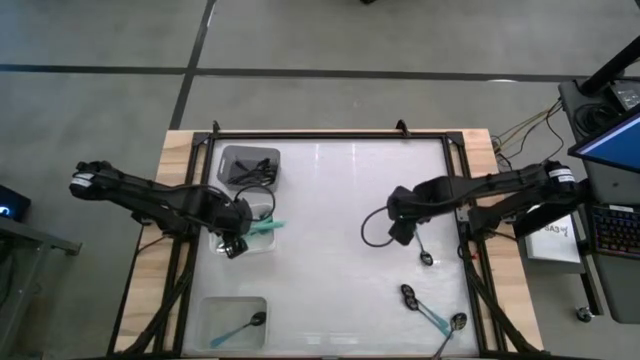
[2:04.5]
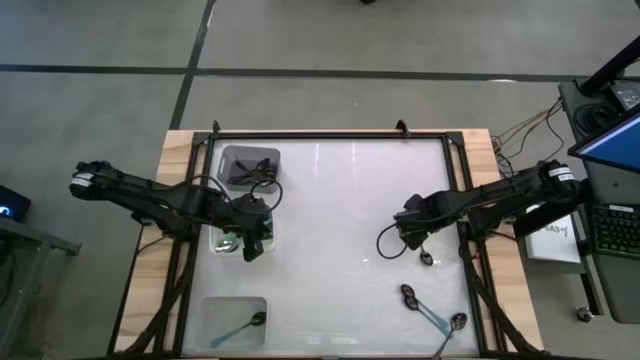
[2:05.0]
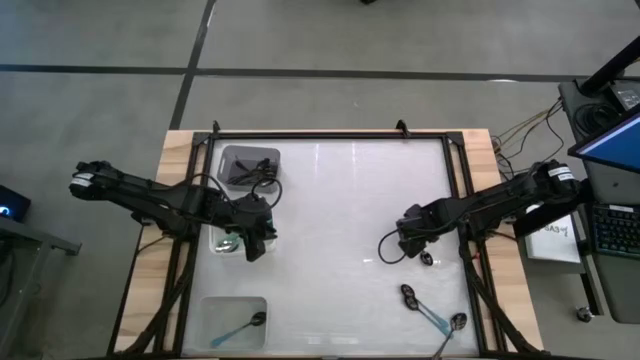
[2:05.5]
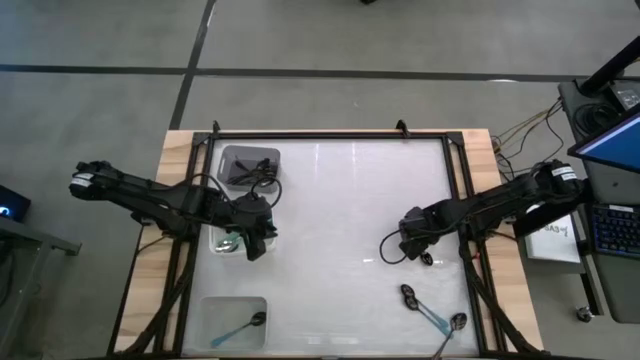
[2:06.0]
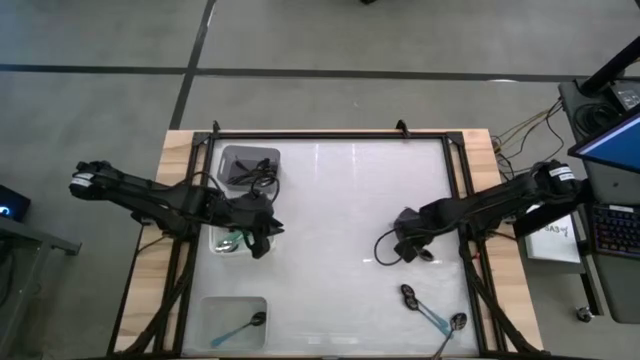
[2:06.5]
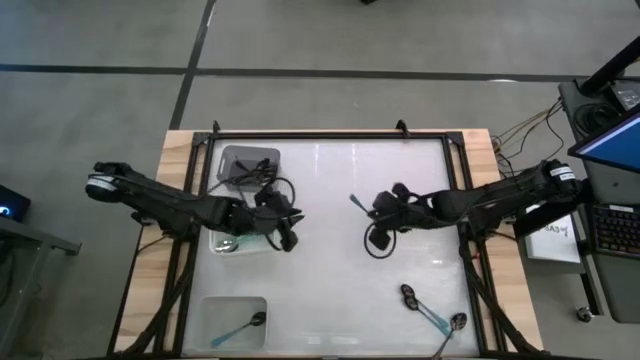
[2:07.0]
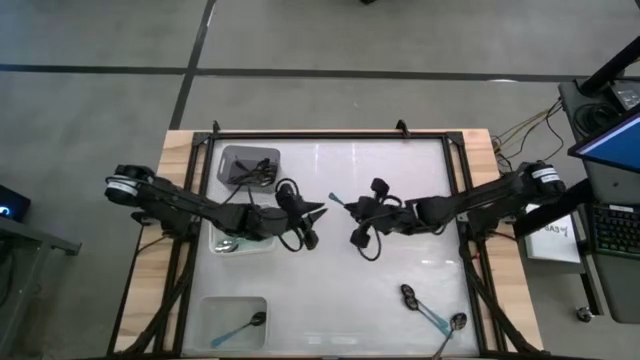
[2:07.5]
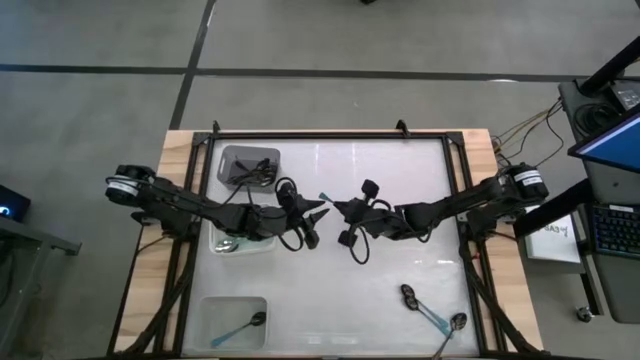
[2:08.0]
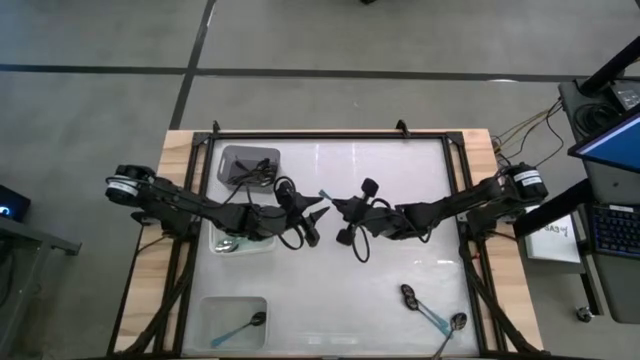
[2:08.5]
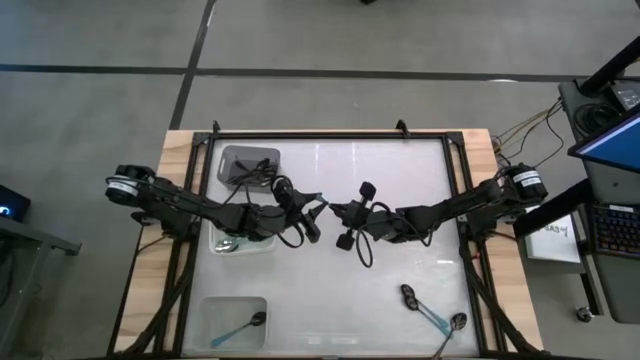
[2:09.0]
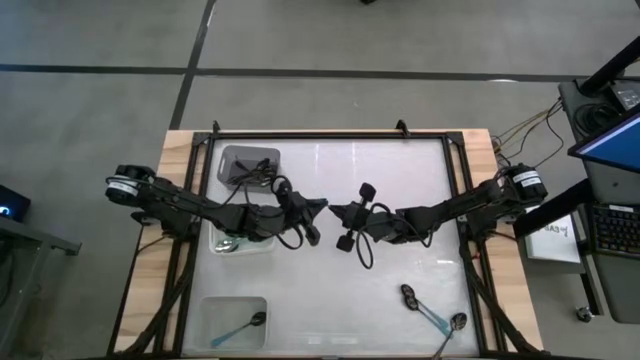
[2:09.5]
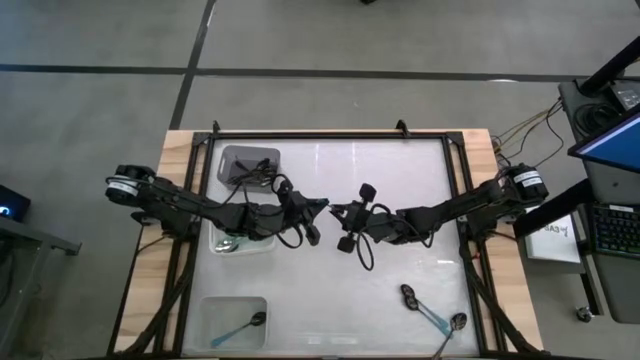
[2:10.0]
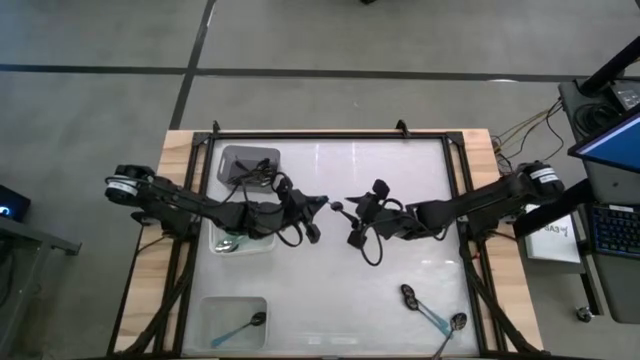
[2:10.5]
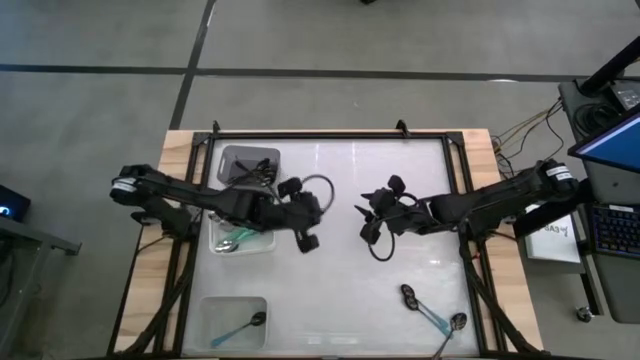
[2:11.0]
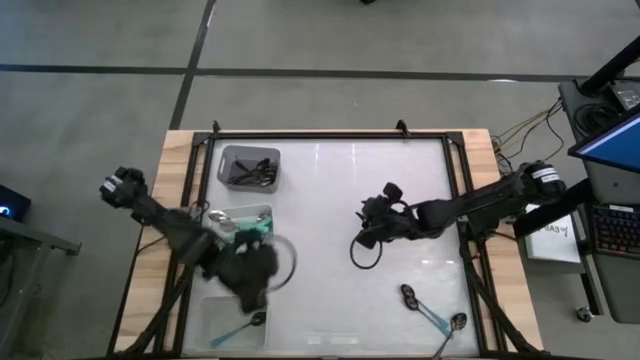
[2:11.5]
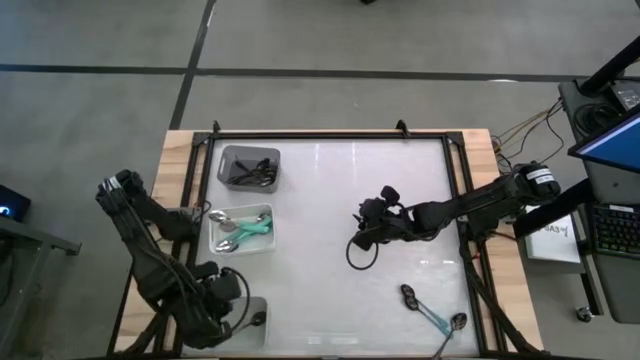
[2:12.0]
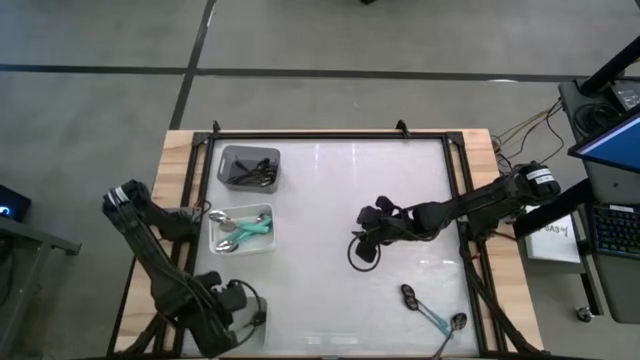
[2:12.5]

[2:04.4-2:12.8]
Task: Sort silverware by color (type)
Put the blue spoon into the gray bin

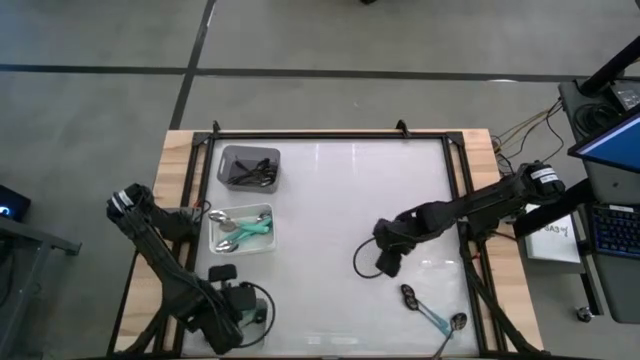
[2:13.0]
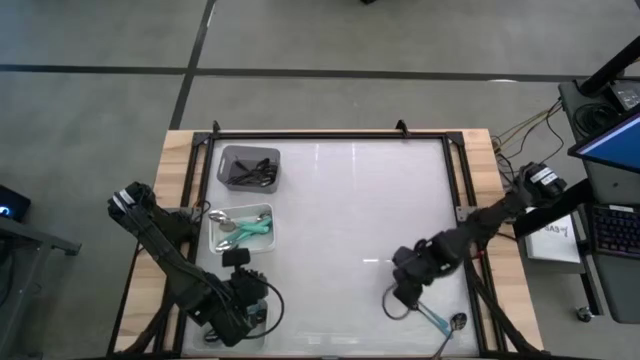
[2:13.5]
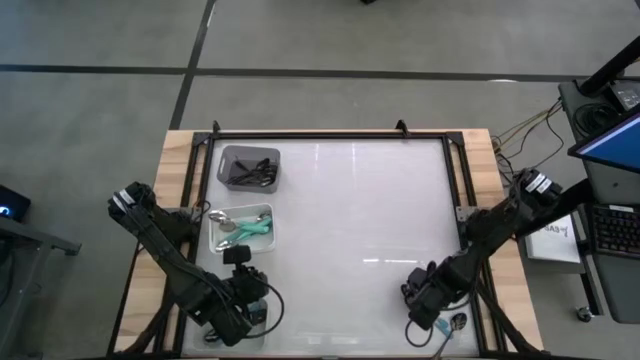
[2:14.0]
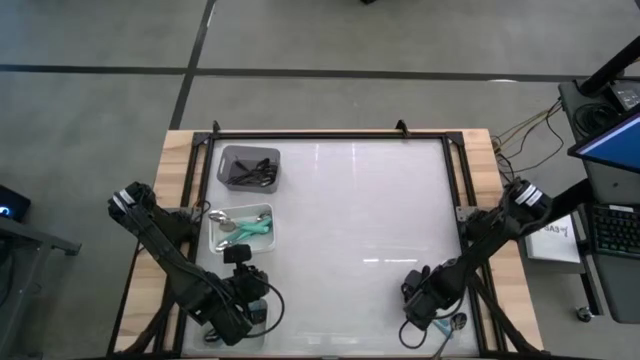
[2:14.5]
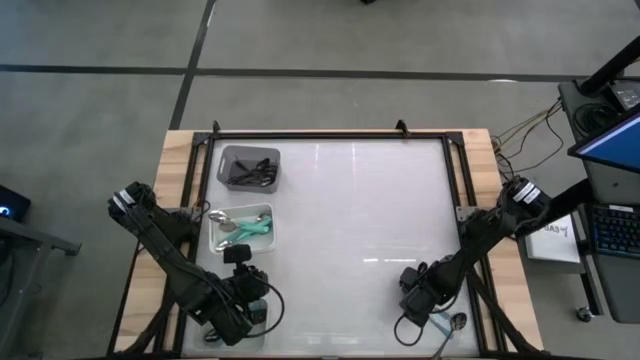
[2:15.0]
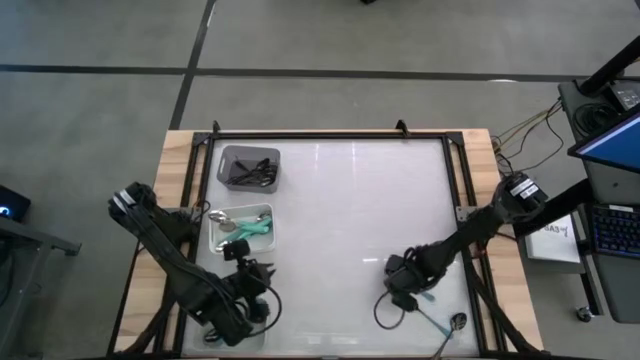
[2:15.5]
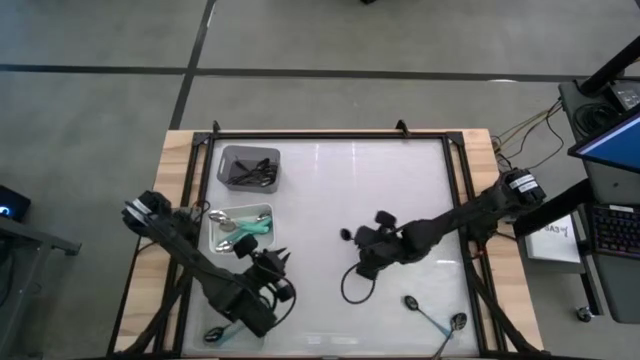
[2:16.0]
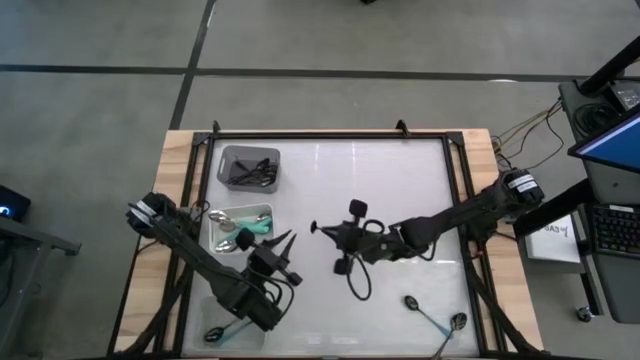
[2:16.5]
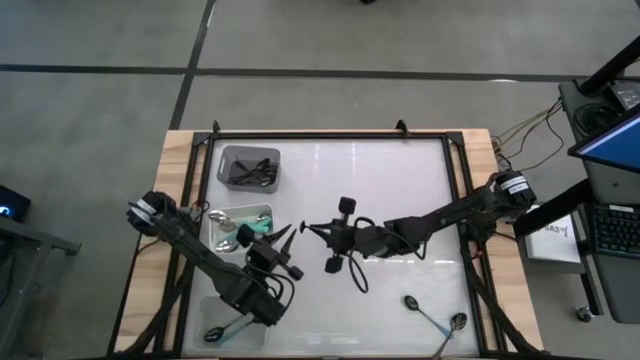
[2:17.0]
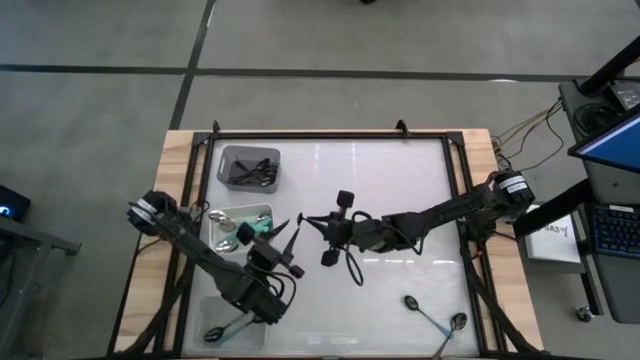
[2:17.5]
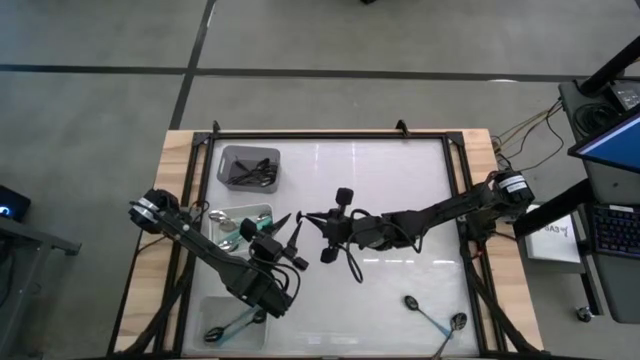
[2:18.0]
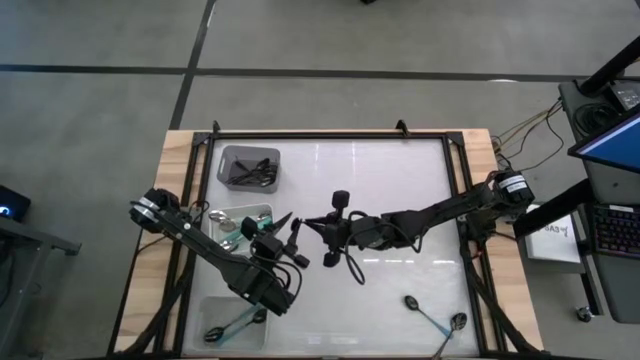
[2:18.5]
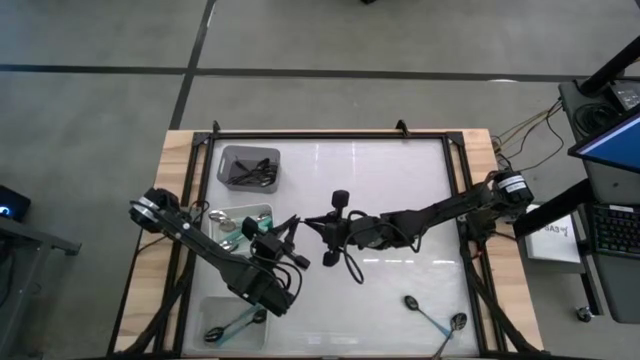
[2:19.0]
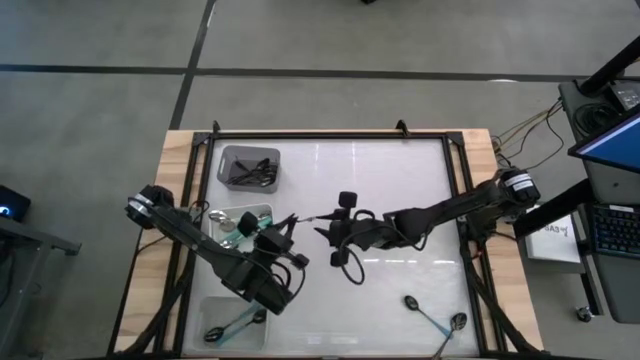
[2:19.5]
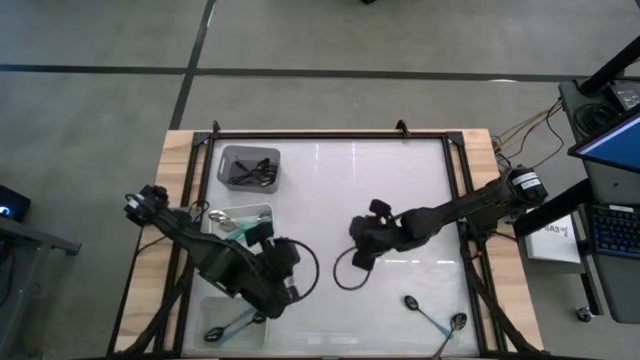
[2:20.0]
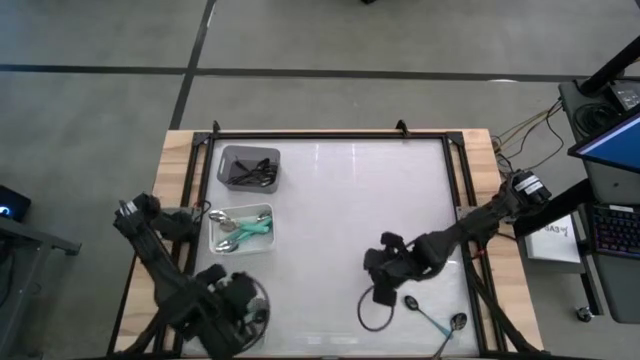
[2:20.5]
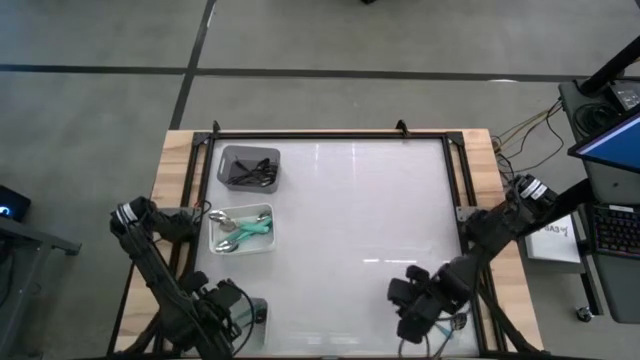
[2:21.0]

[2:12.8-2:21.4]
Put the blue spoon into the gray bin

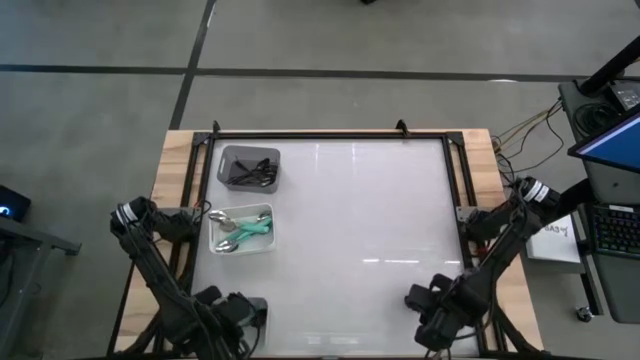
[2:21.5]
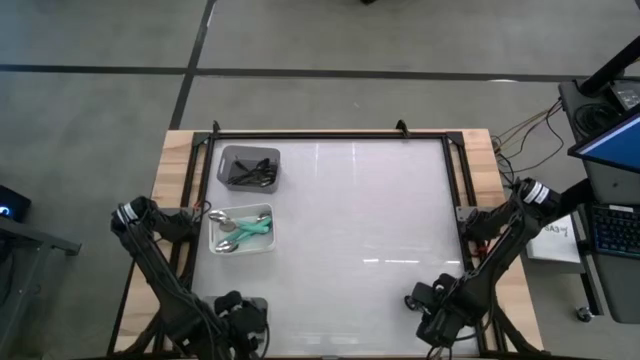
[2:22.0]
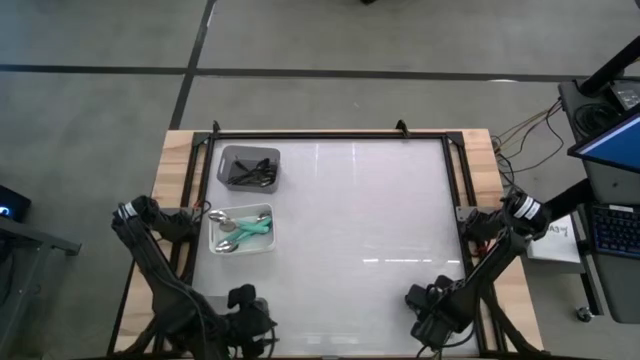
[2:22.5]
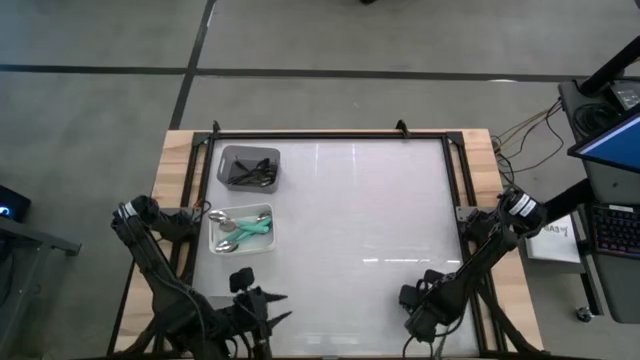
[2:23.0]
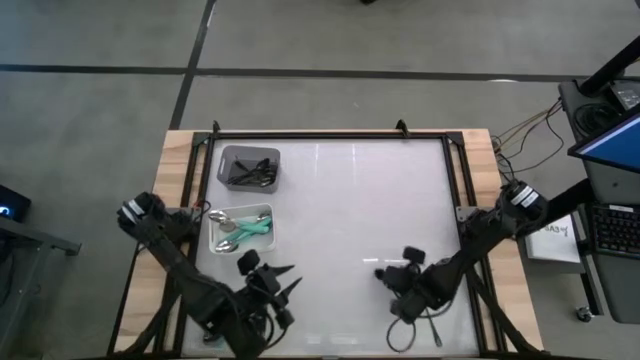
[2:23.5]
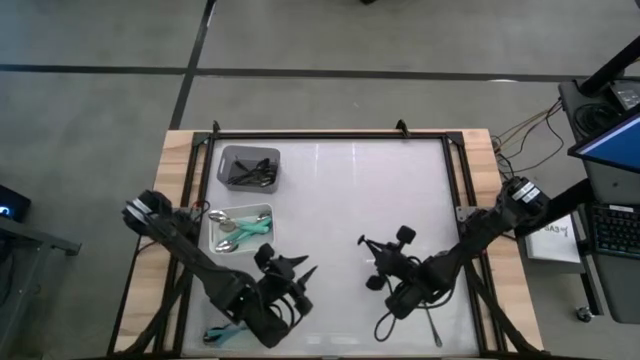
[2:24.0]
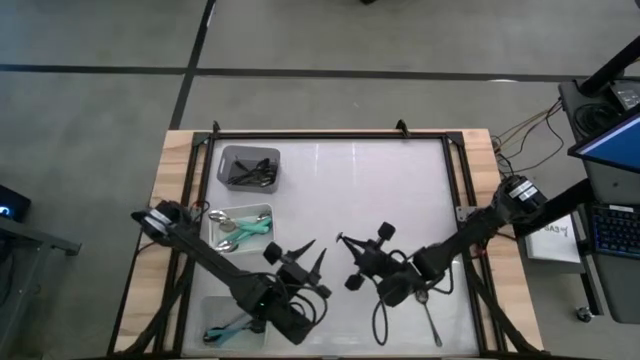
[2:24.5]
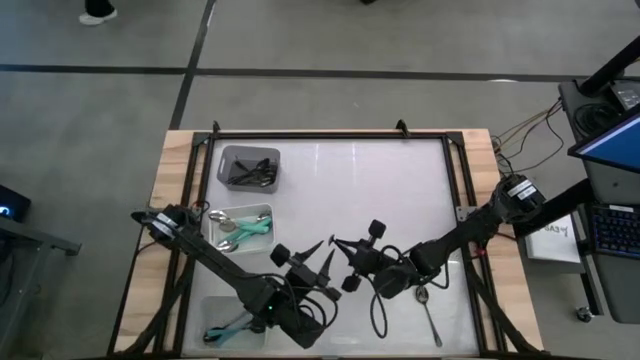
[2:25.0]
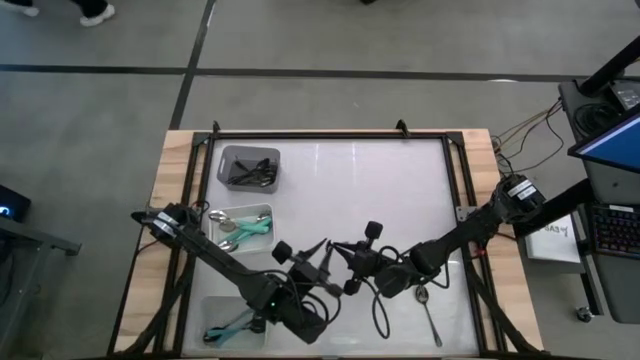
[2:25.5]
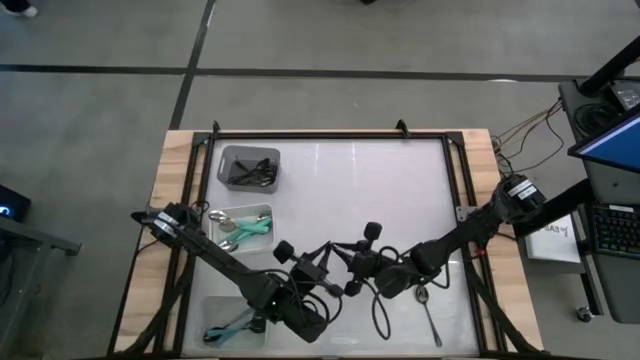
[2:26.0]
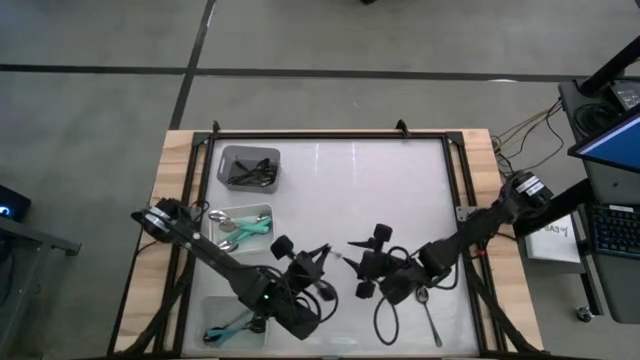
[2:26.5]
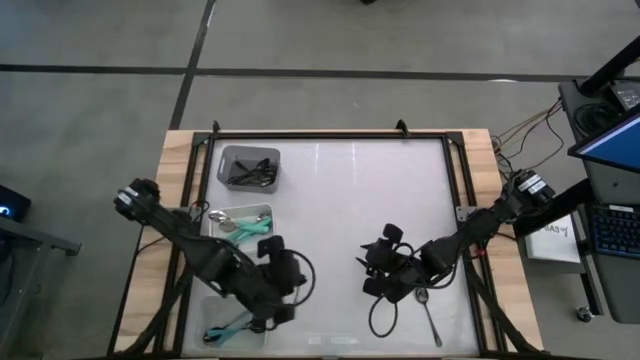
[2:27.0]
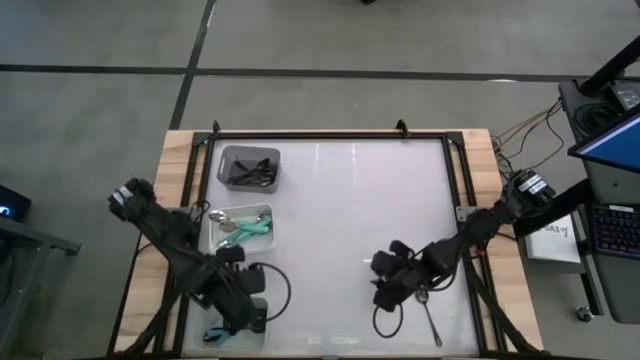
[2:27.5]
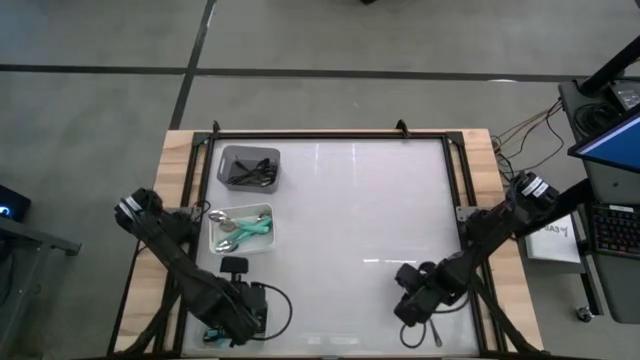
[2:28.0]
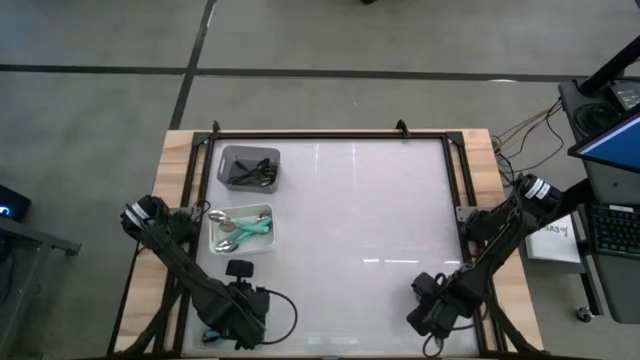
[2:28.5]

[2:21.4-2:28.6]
Put the blue spoon into the gray bin
